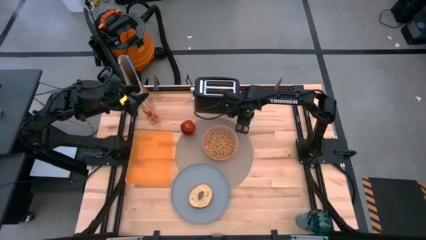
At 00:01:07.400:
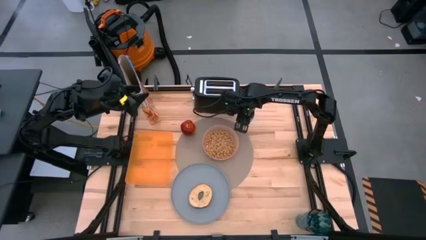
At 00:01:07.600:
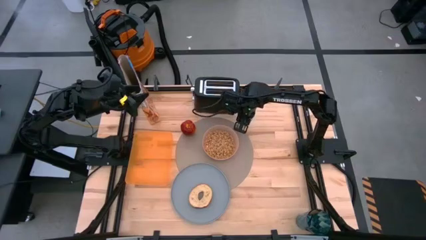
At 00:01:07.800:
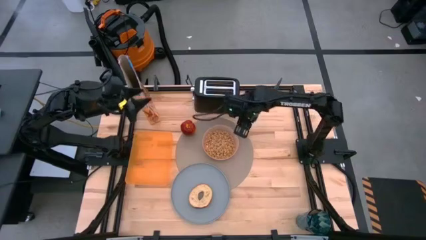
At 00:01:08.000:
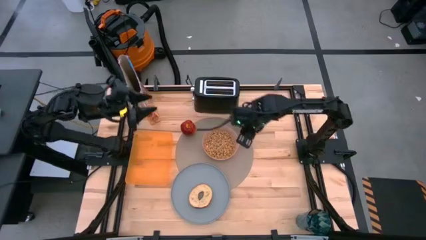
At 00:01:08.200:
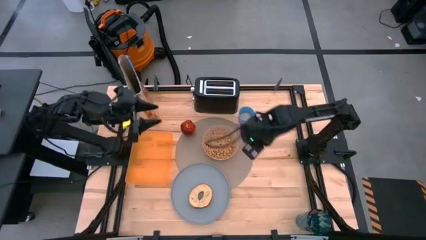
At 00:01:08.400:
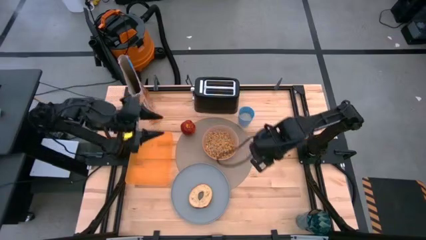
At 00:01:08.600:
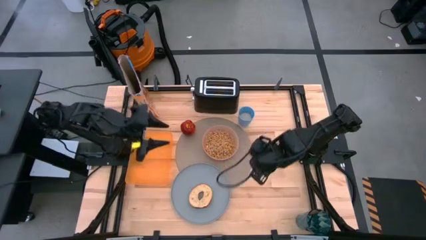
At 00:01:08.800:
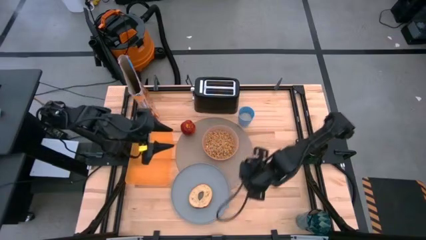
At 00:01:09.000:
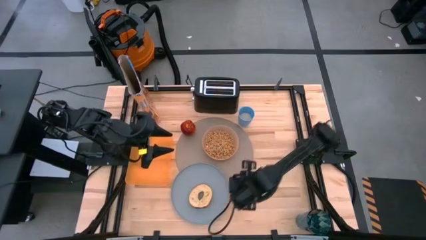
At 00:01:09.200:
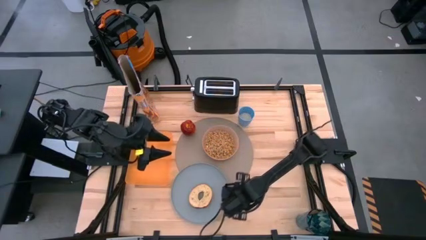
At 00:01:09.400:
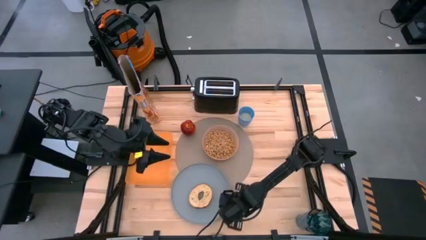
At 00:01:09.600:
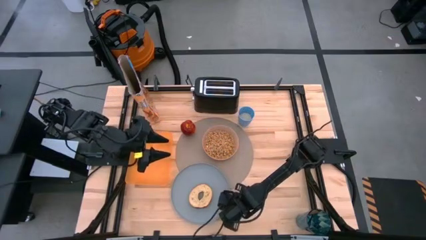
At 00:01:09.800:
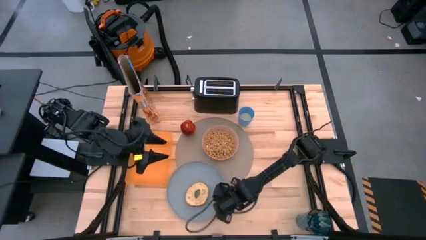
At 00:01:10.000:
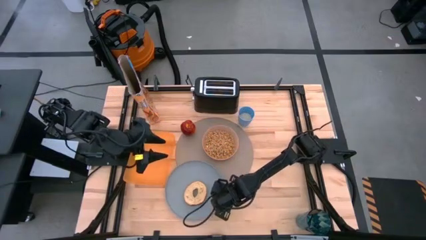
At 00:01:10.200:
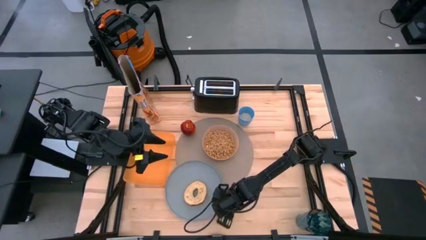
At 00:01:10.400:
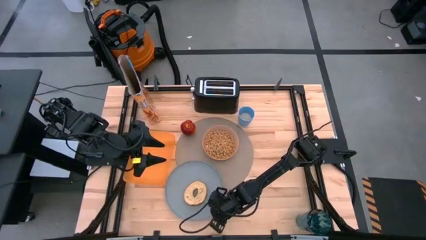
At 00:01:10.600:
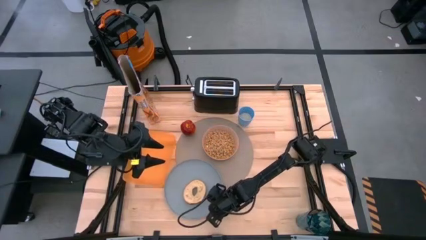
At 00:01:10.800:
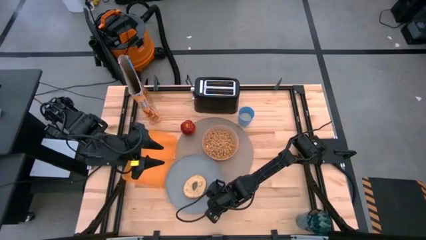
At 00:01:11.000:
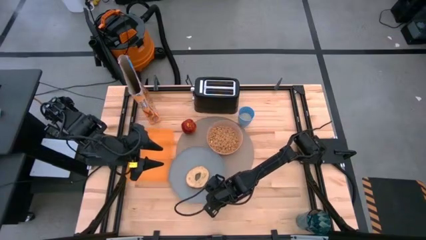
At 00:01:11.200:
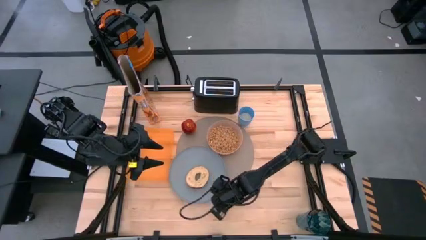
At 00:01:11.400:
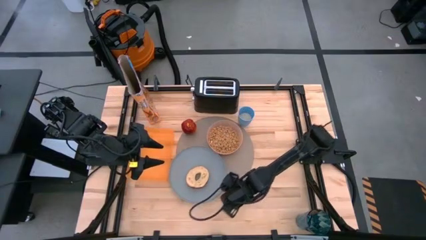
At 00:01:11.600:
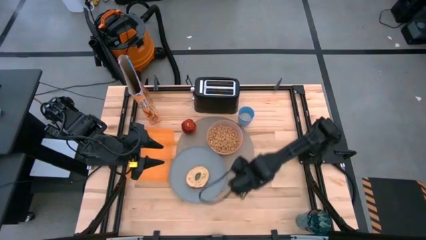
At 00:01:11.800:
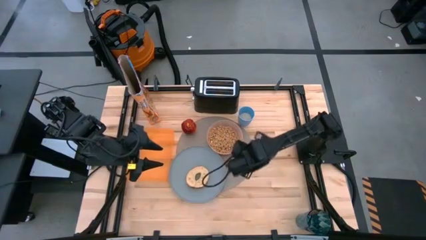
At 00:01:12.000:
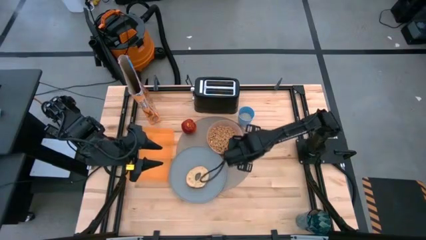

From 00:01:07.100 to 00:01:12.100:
Task: Arrange a breakfast setting
Adjust the light blue plate on the gray placemat

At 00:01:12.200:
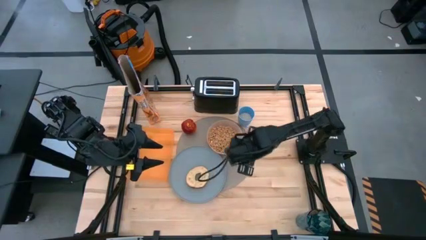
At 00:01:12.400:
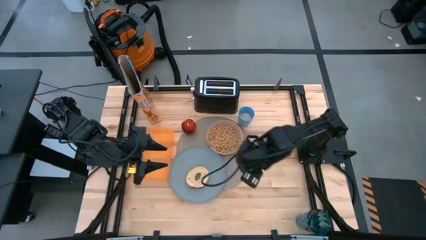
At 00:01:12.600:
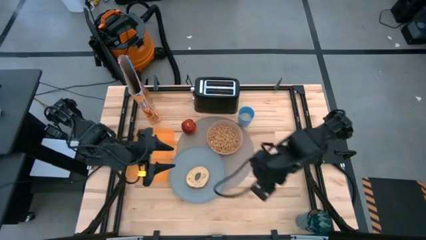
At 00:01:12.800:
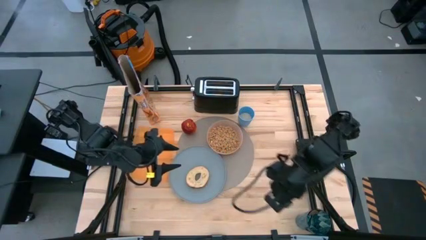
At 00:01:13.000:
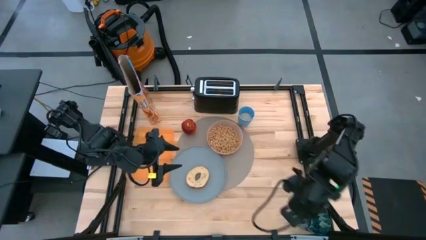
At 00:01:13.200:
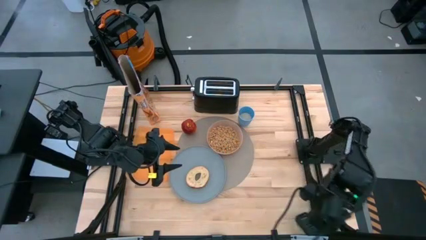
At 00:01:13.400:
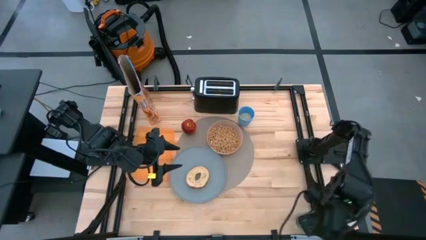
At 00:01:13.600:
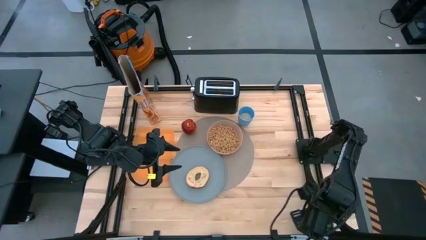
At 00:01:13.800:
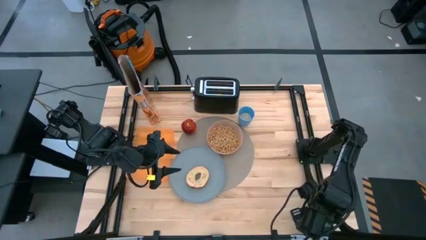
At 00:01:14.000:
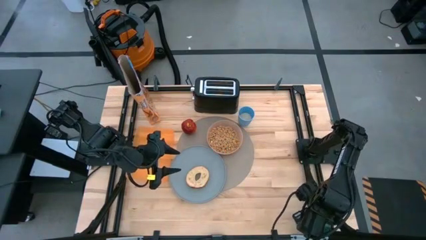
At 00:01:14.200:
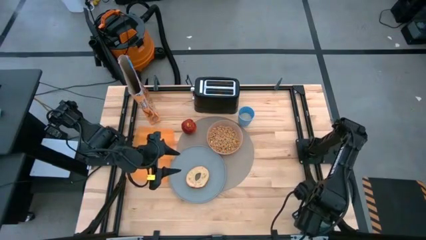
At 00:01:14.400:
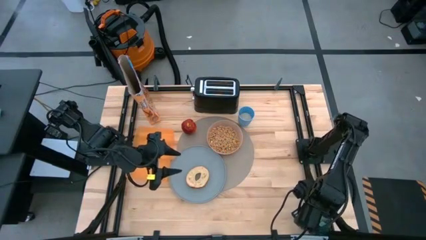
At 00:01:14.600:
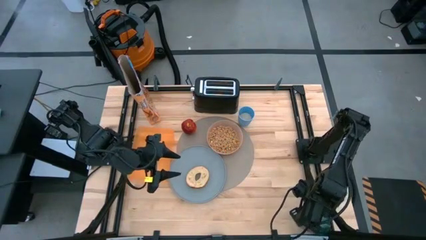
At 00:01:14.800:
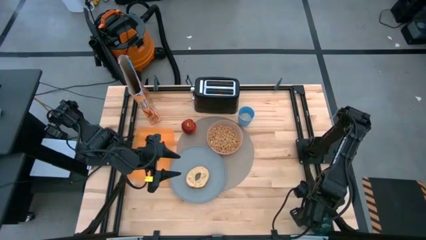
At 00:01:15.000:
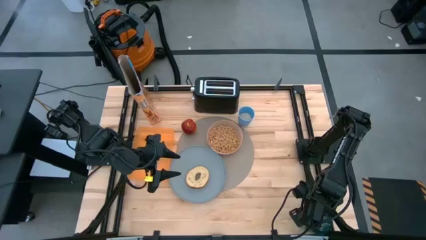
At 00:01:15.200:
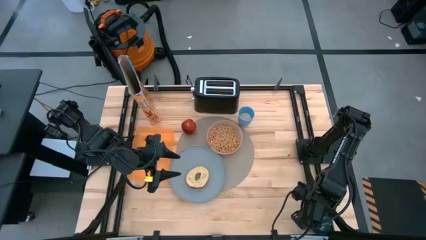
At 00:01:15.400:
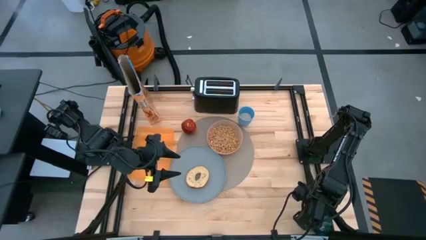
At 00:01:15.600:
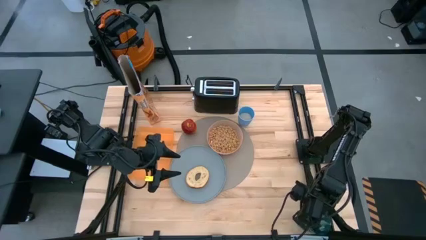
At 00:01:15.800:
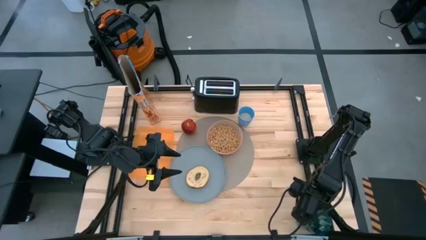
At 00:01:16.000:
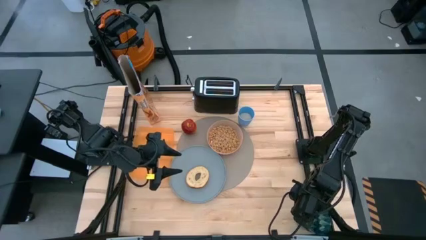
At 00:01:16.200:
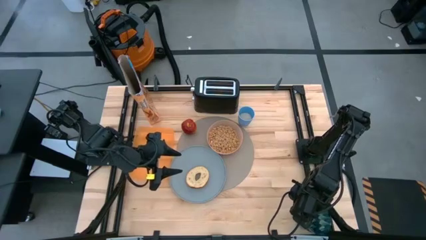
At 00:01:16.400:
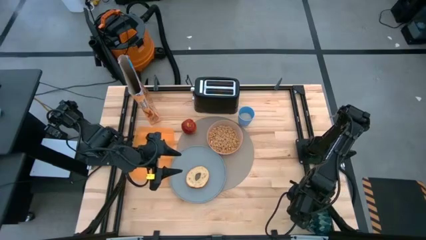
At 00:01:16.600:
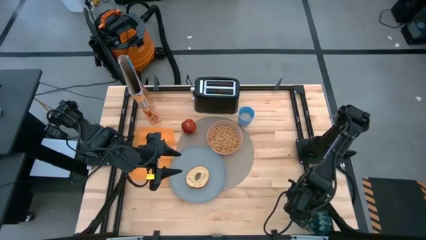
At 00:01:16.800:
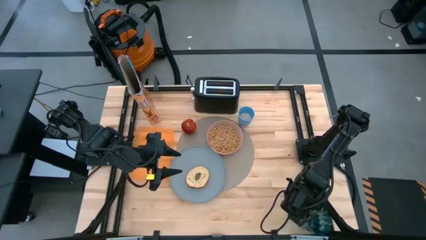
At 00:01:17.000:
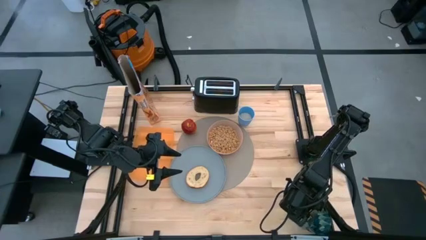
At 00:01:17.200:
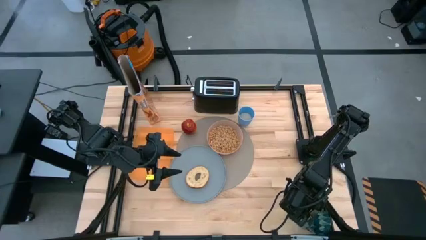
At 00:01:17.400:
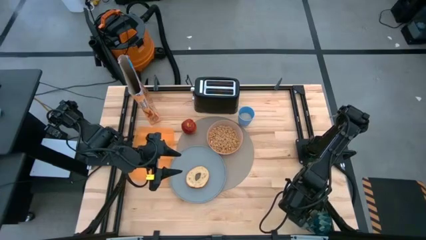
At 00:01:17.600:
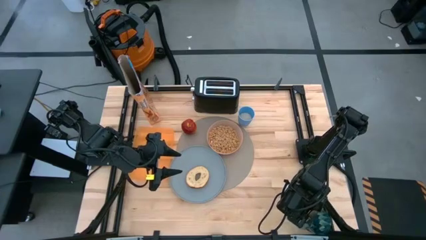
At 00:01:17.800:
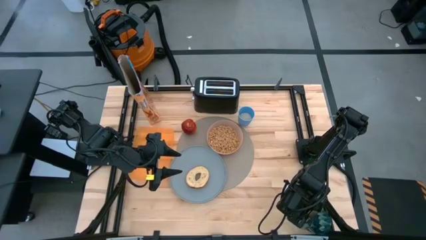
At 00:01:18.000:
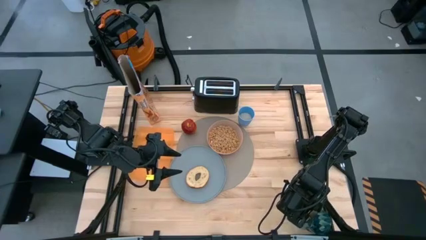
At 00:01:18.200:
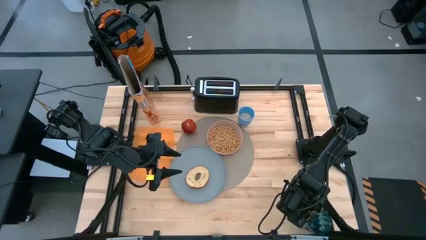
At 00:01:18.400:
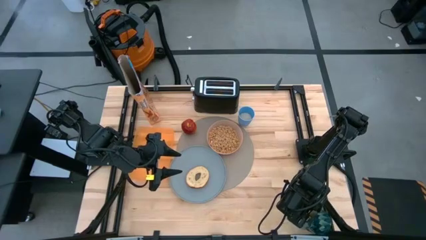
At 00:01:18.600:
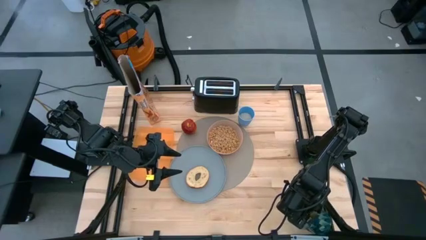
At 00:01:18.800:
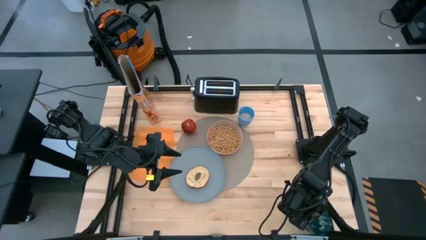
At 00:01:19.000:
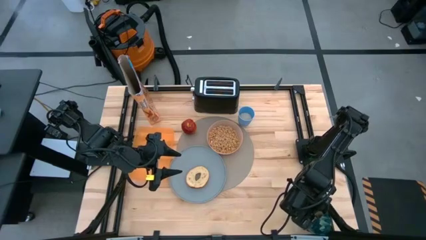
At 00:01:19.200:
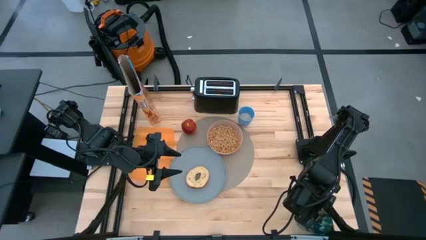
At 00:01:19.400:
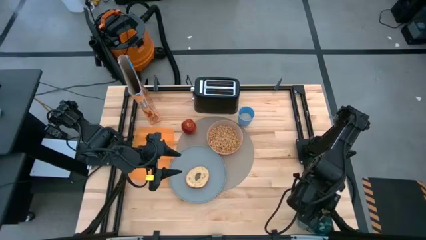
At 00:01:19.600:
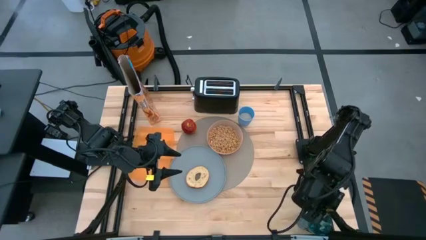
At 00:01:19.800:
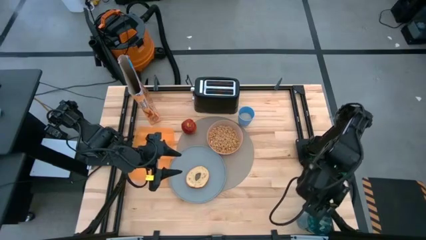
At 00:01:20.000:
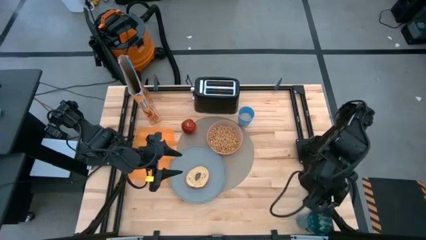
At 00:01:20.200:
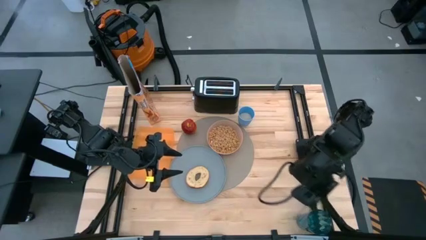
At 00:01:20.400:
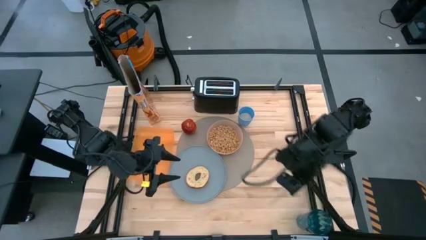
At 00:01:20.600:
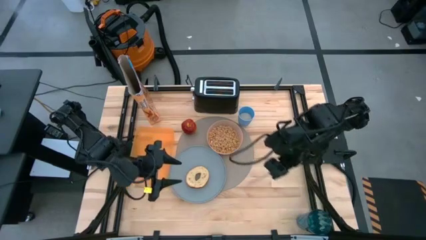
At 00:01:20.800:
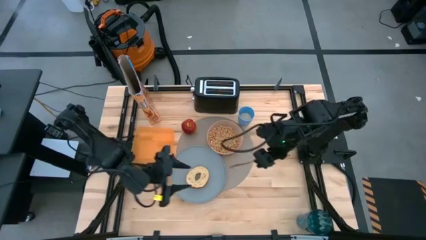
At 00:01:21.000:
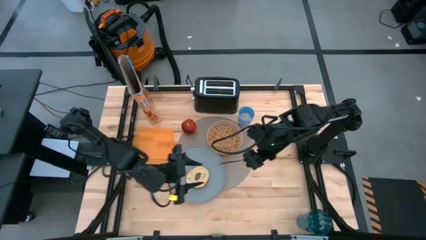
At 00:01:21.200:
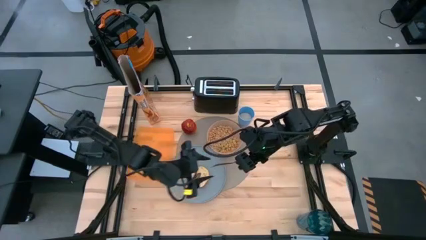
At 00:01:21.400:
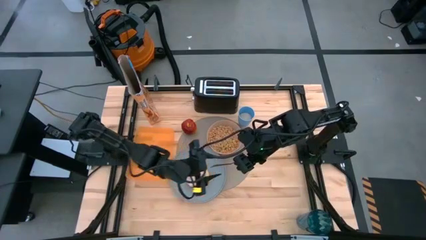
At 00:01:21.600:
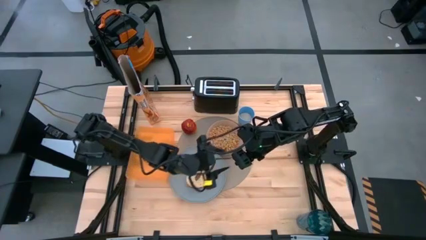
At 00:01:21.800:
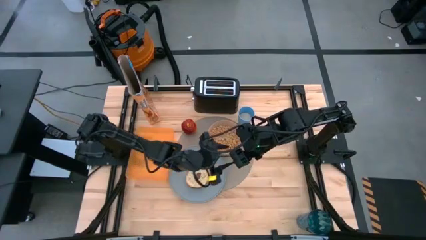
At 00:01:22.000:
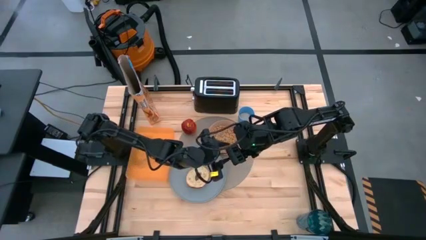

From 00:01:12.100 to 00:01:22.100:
Remove the black spoon from the blue glass and place it on the middle right of the gray placemat
